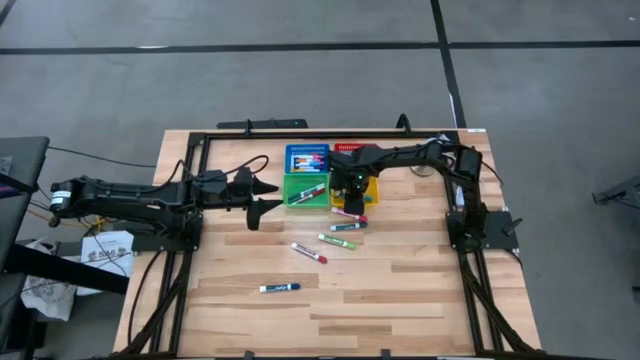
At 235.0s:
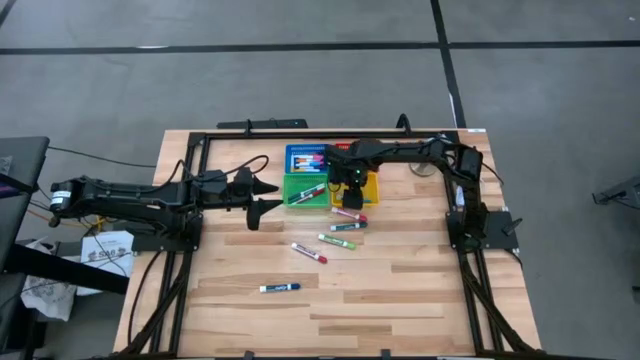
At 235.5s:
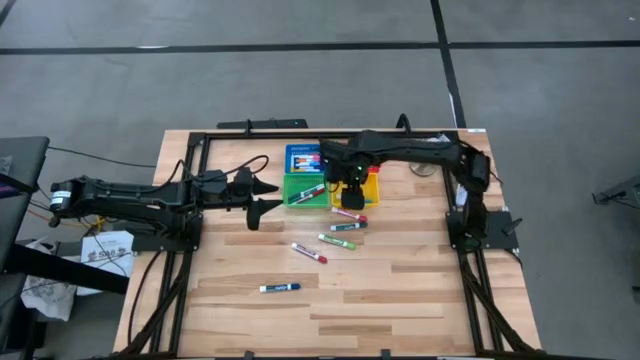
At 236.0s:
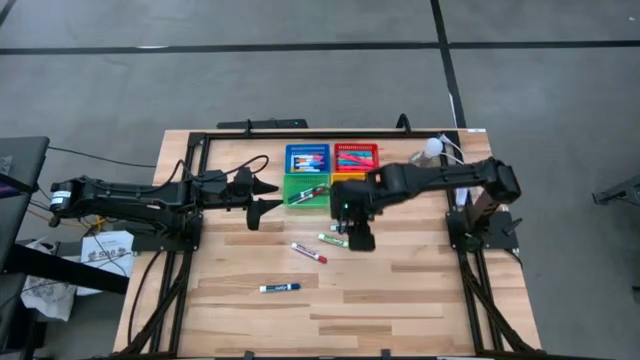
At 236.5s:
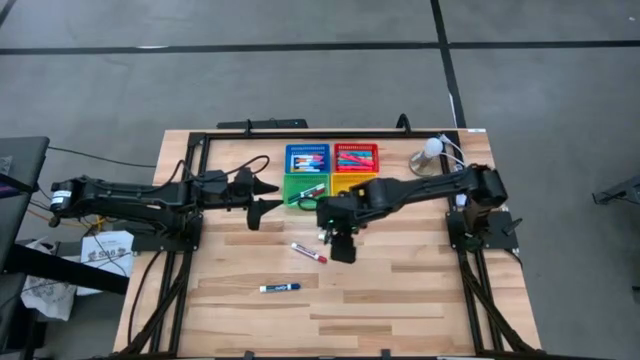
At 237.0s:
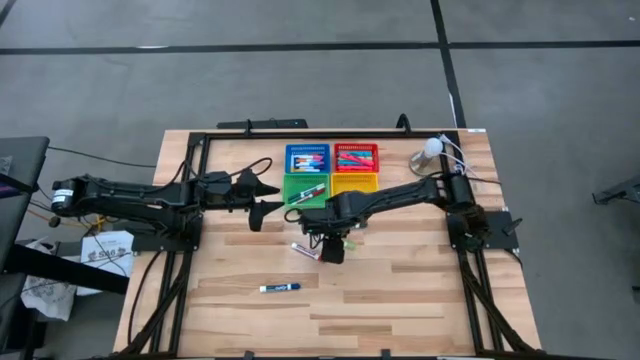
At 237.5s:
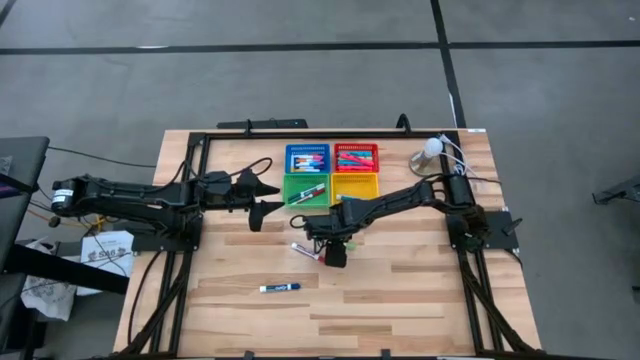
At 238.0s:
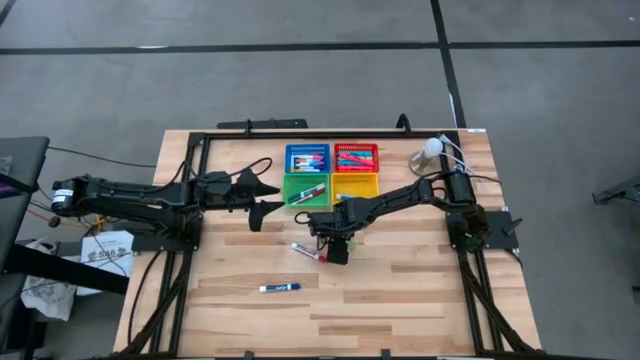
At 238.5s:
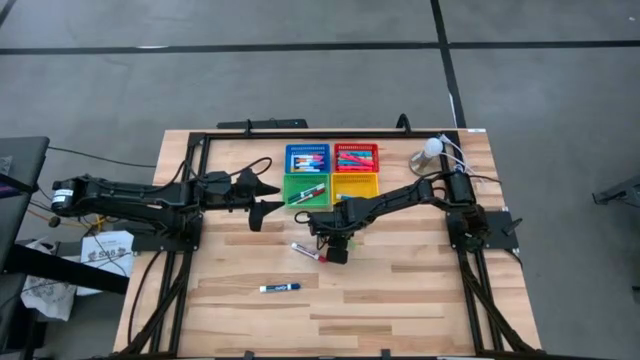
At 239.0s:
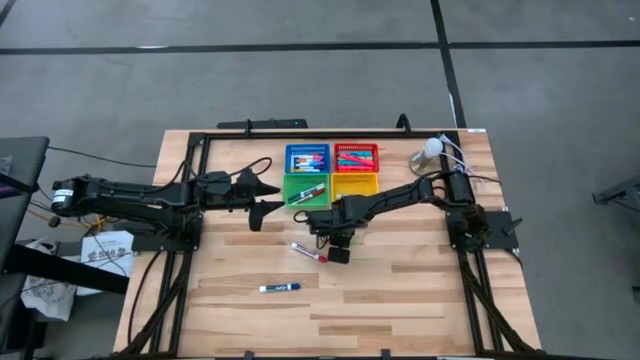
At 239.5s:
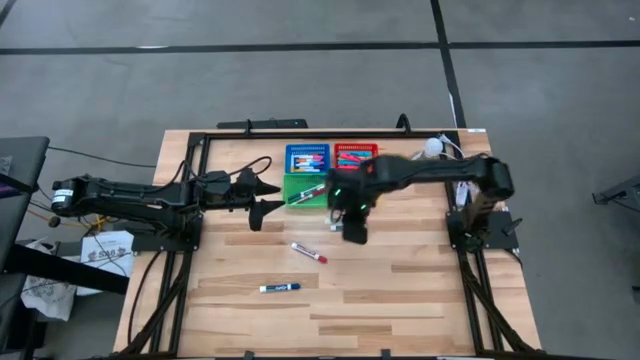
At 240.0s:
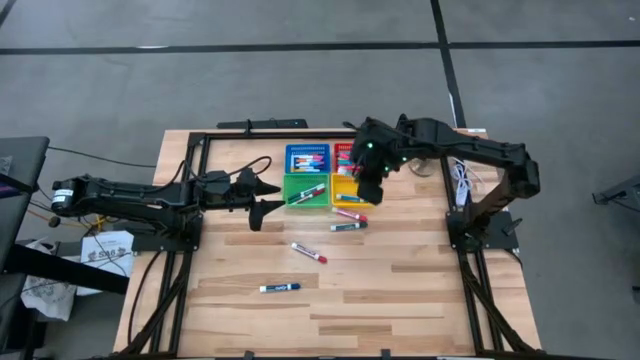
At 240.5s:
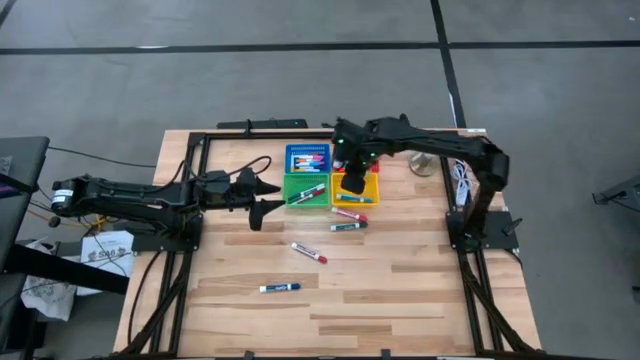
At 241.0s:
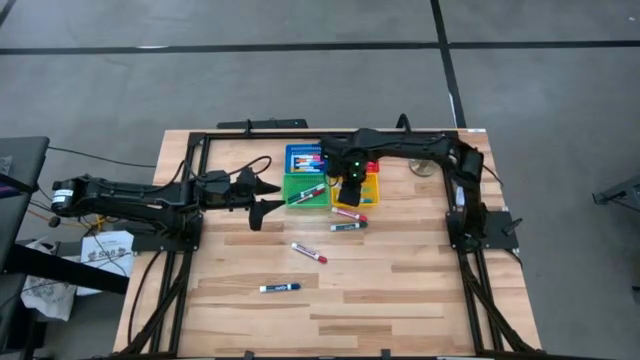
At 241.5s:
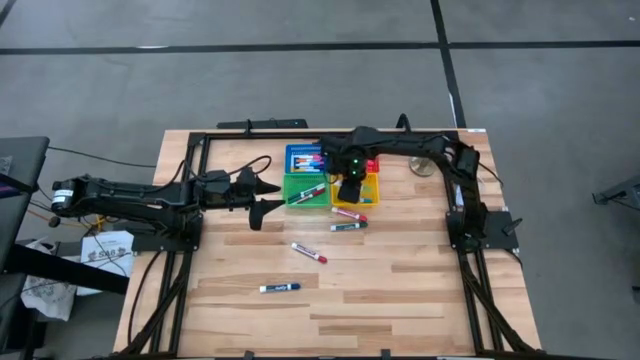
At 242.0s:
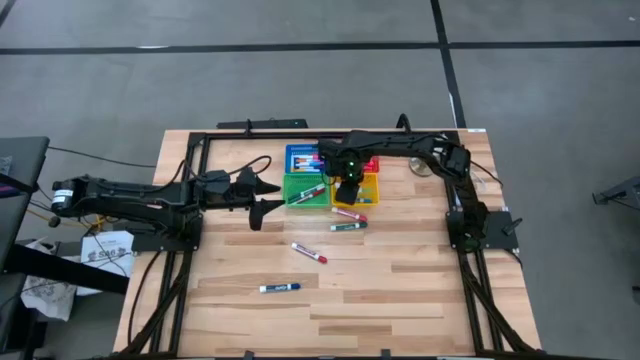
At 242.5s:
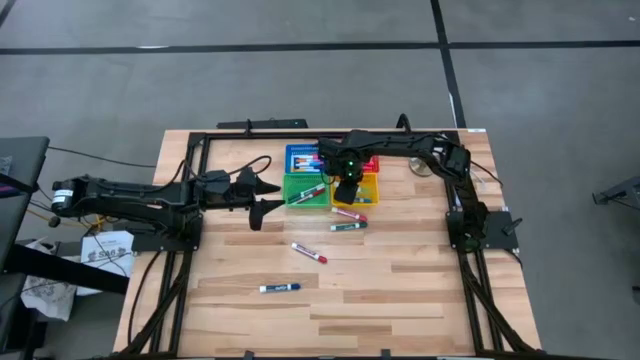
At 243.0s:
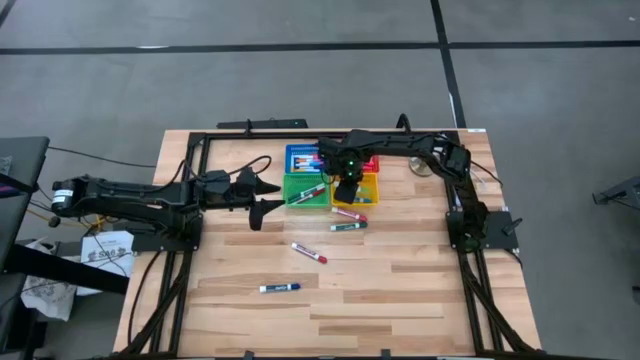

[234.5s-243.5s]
Task: Pick & Place Markers
Put the large light green marker into the yellow bin

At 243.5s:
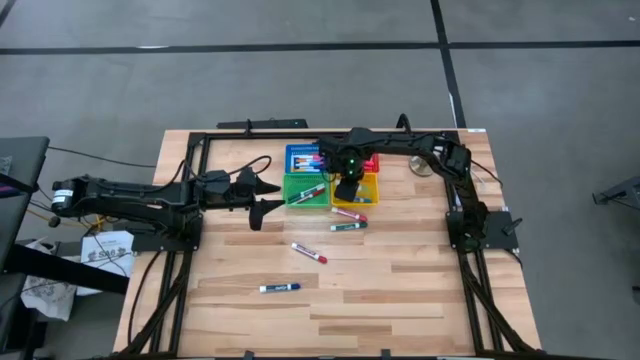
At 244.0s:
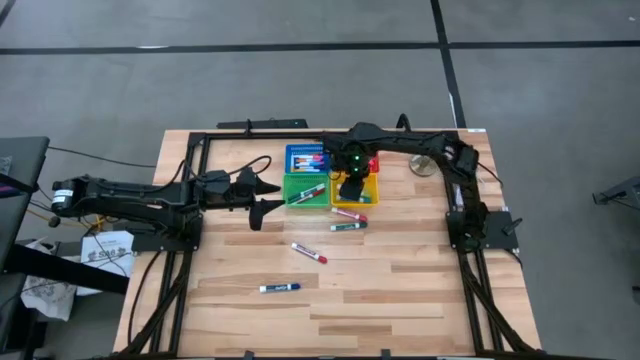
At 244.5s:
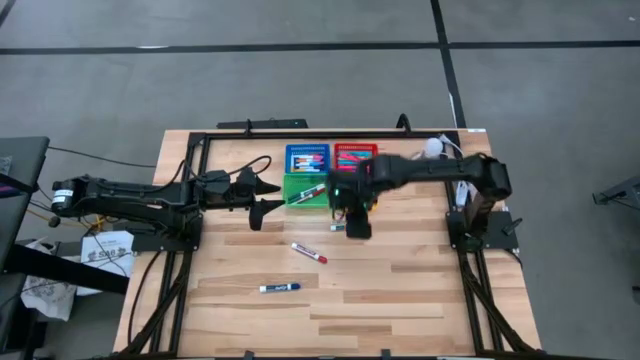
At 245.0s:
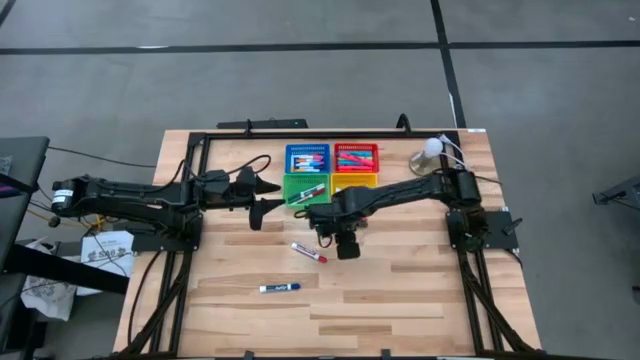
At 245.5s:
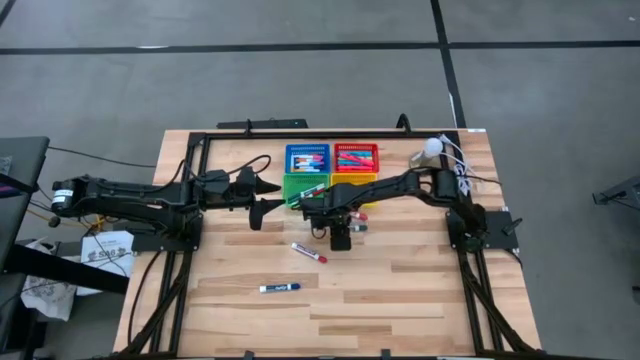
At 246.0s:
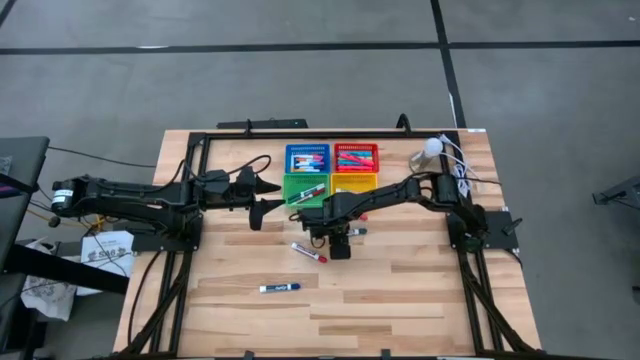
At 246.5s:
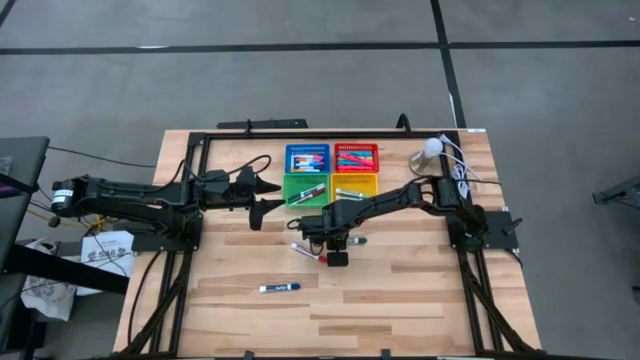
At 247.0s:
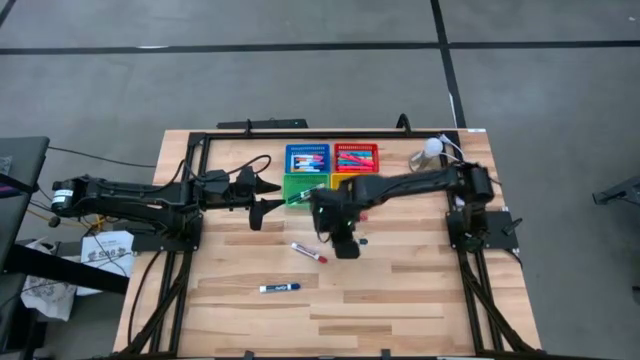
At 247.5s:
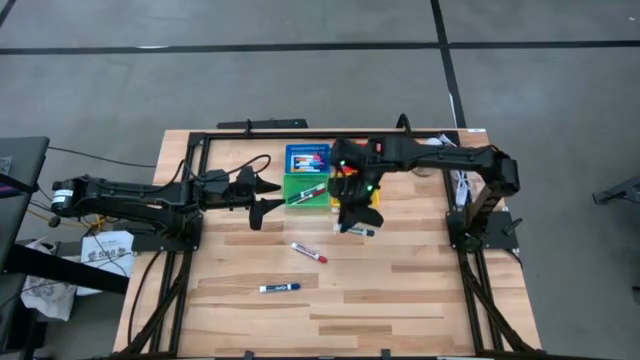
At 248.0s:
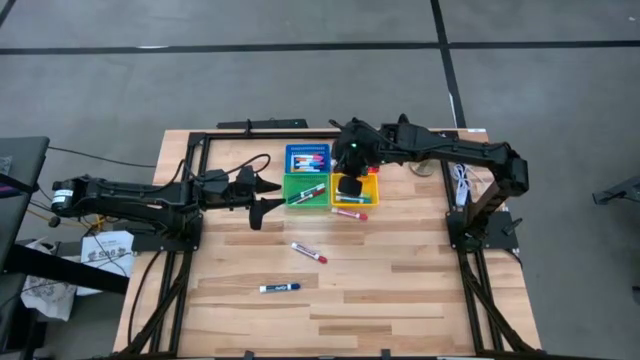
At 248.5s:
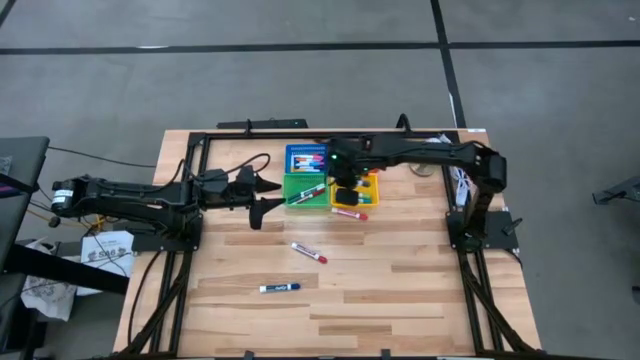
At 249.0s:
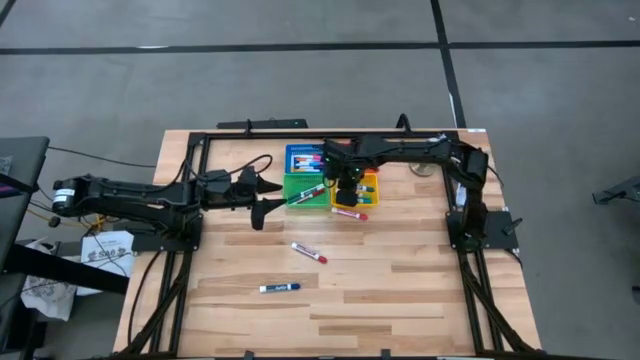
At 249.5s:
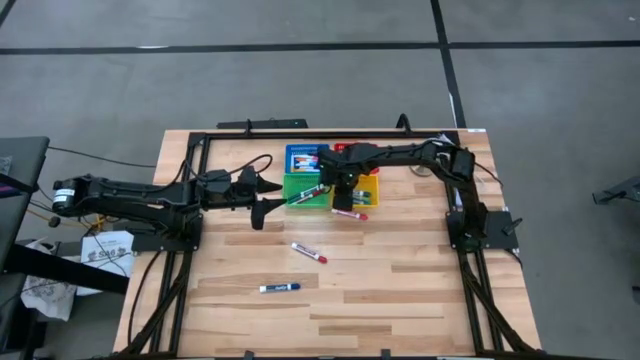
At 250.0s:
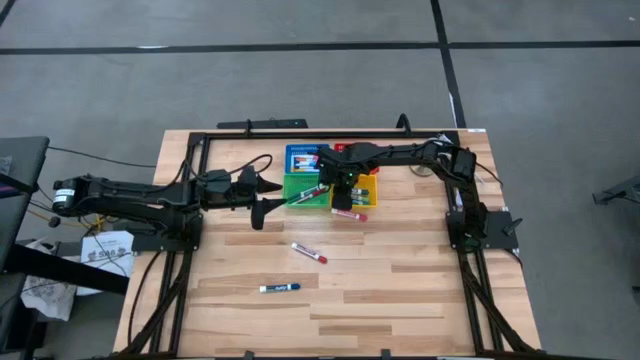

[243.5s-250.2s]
Put the large green marker into the yellow bin

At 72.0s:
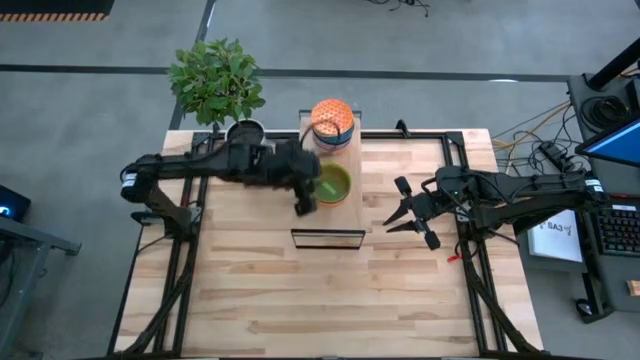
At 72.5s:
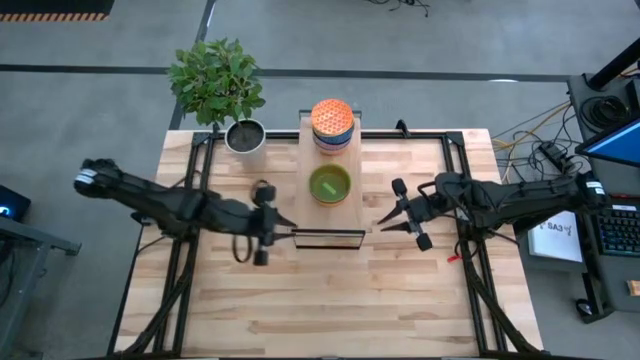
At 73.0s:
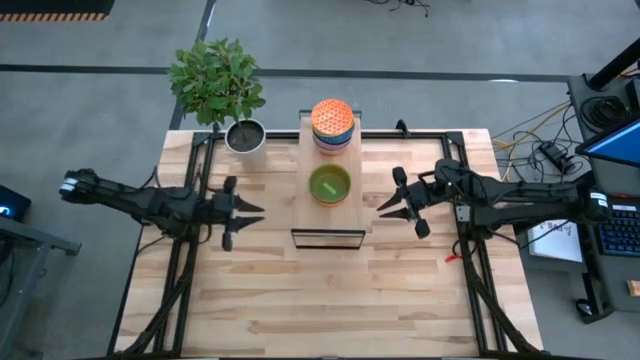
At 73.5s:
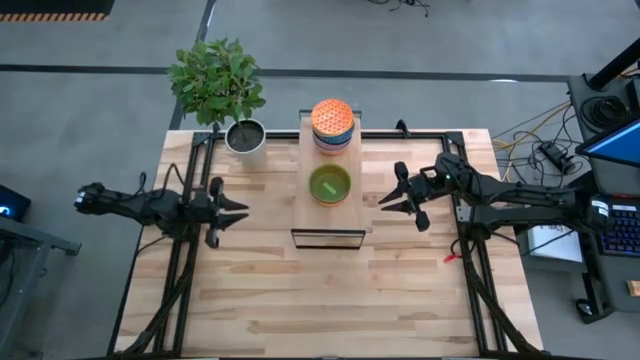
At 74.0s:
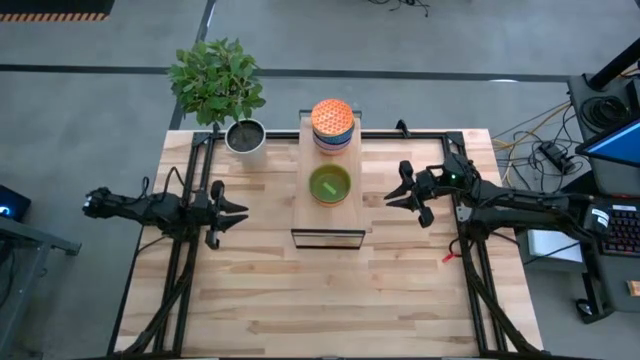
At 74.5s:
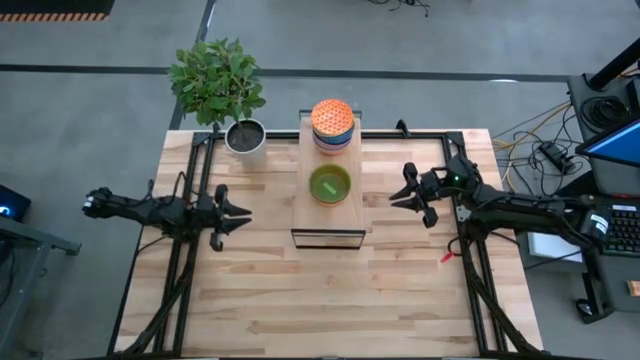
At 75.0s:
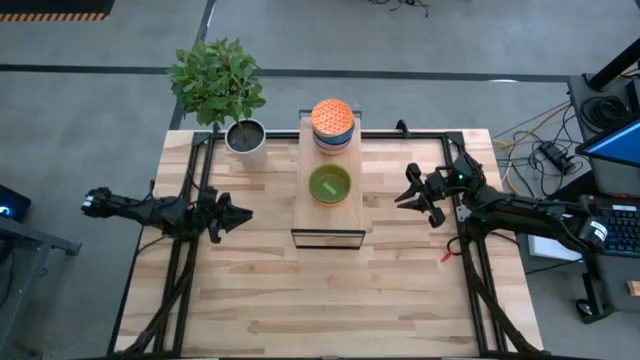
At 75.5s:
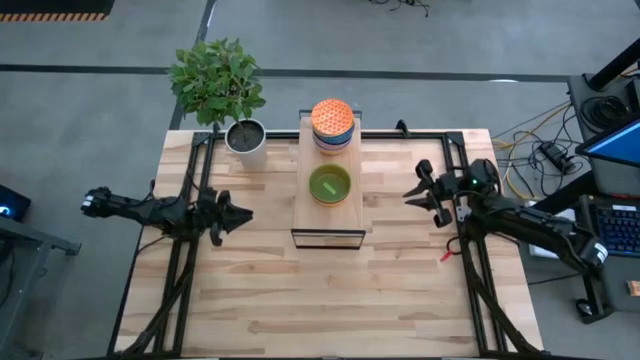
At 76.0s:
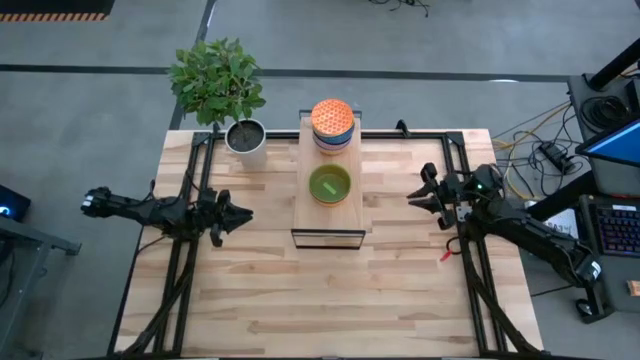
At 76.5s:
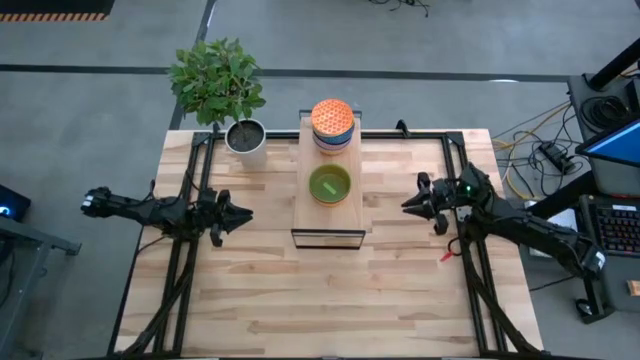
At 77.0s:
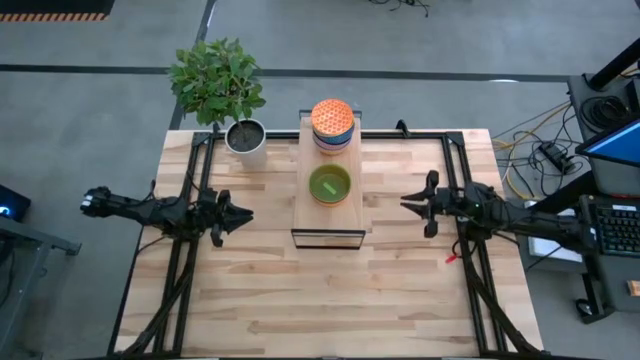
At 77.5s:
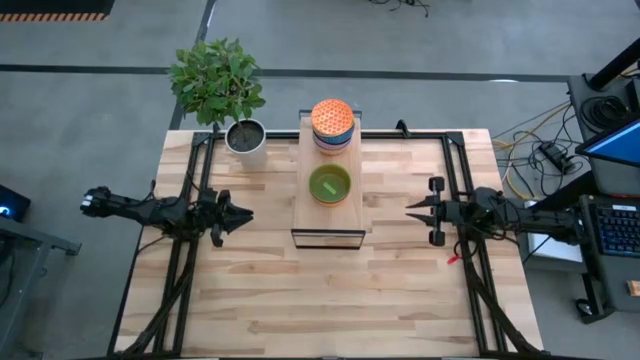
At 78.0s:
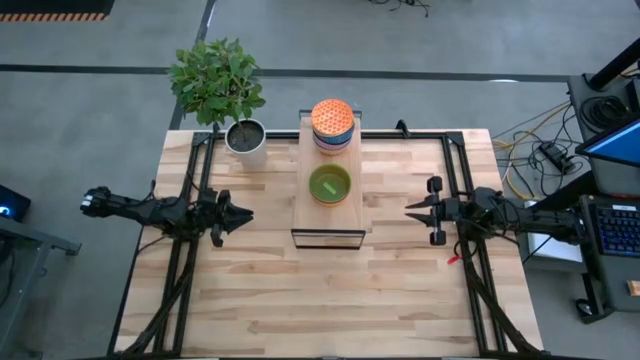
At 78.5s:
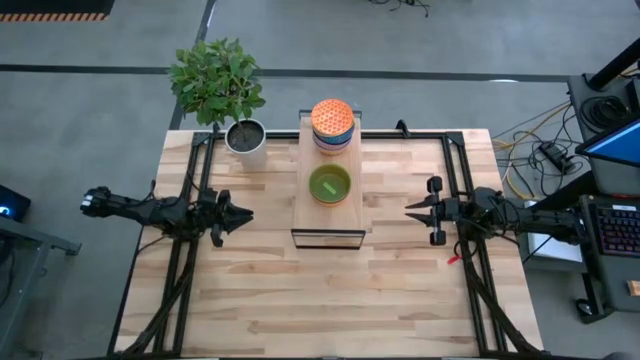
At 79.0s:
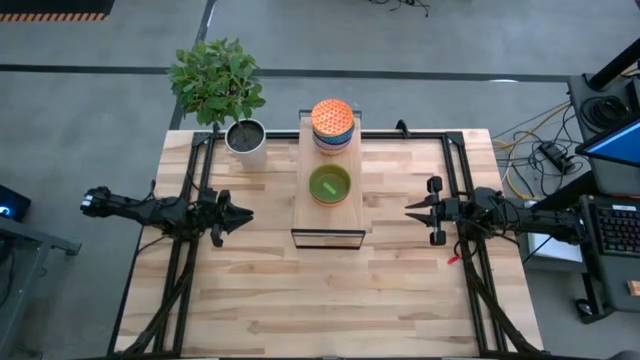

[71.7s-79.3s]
Task: Place and stack bowls onto a shelf
Return to Home Position
